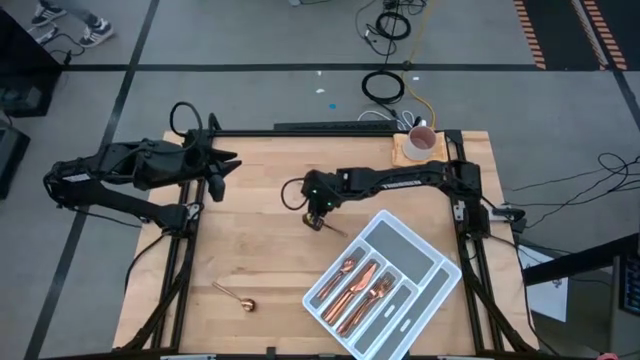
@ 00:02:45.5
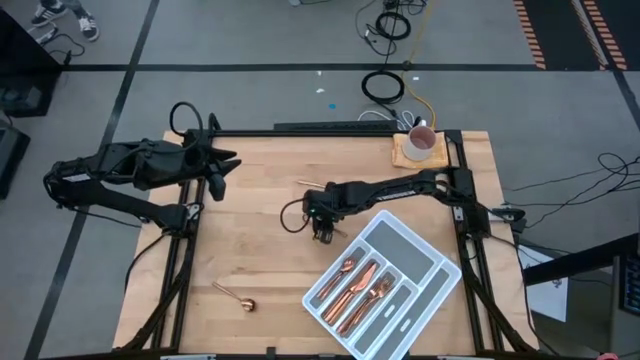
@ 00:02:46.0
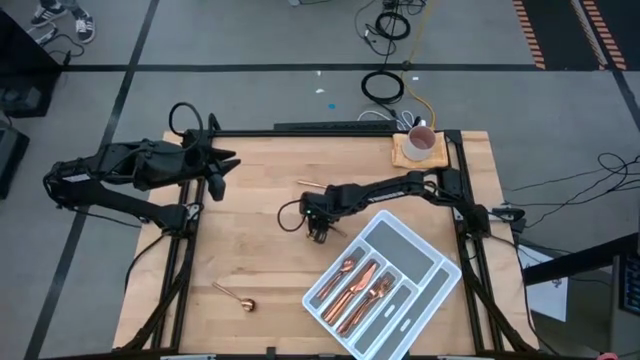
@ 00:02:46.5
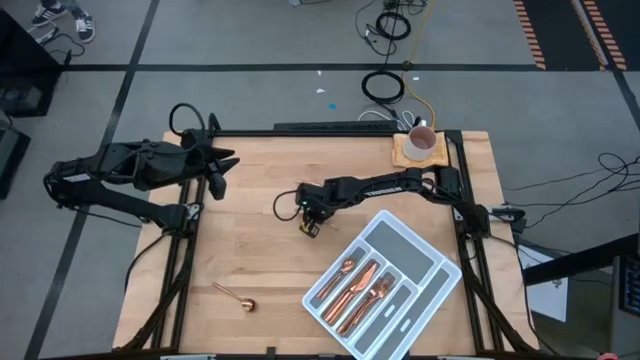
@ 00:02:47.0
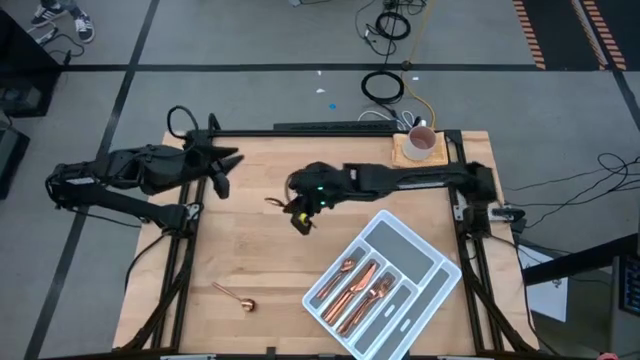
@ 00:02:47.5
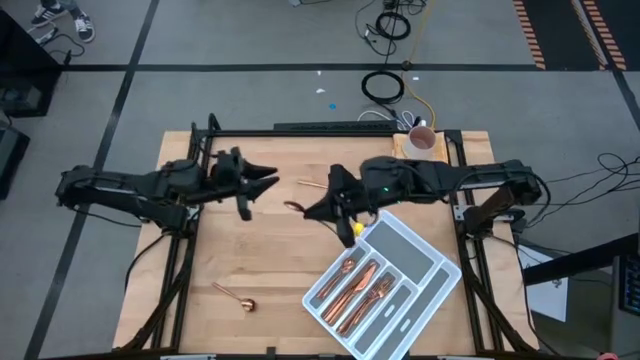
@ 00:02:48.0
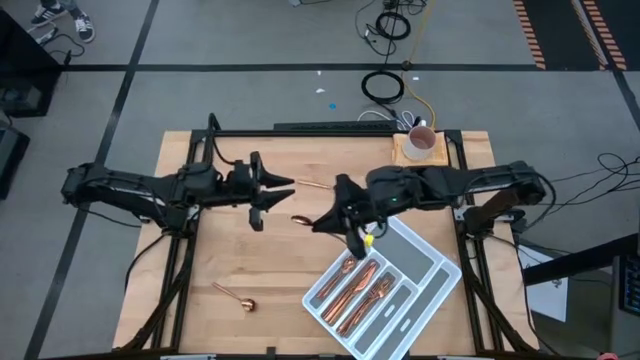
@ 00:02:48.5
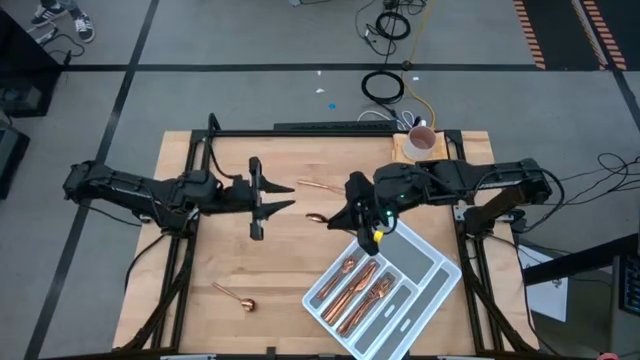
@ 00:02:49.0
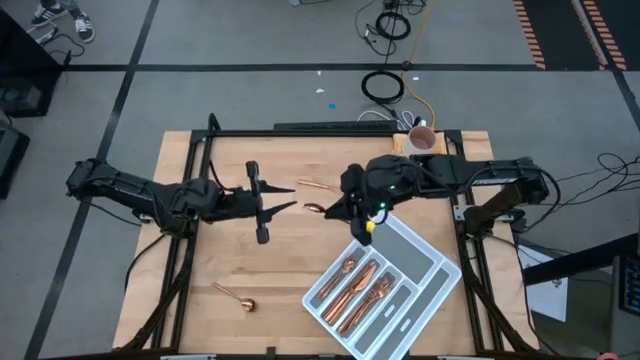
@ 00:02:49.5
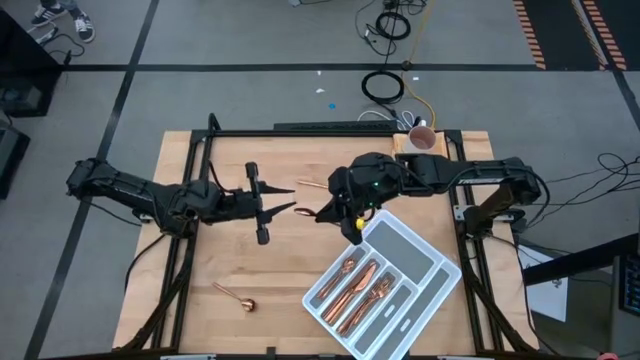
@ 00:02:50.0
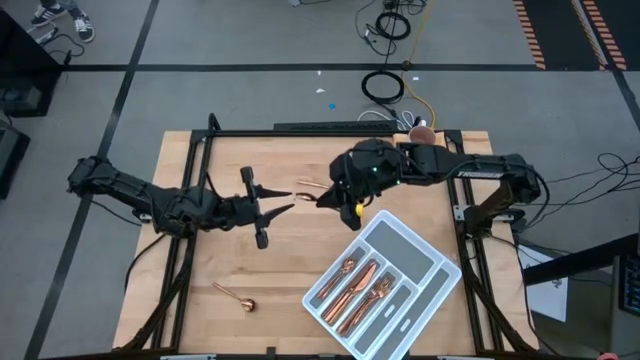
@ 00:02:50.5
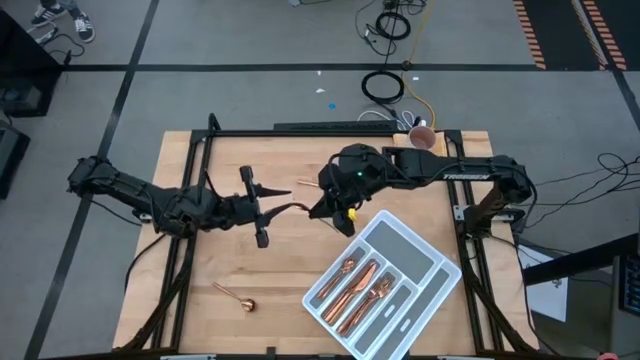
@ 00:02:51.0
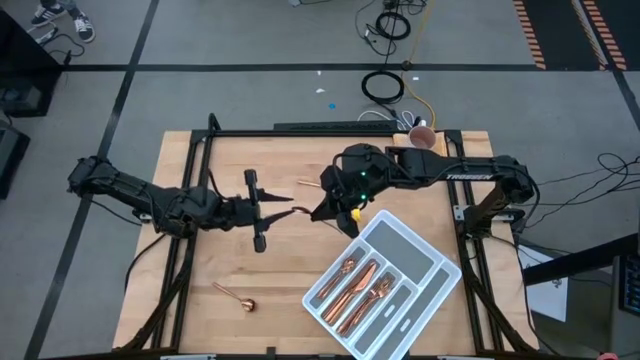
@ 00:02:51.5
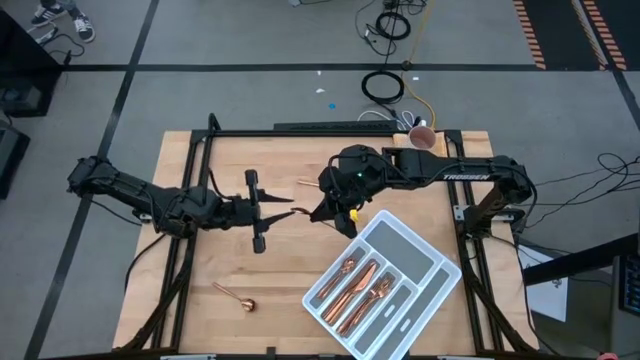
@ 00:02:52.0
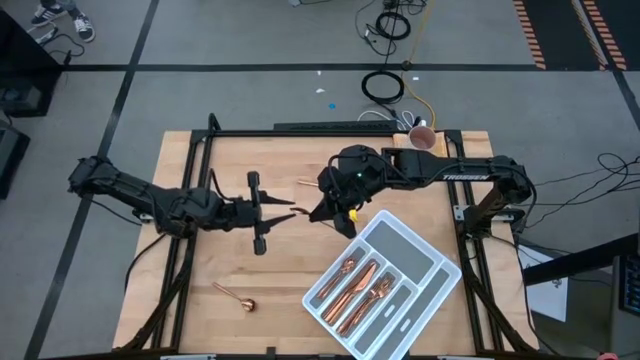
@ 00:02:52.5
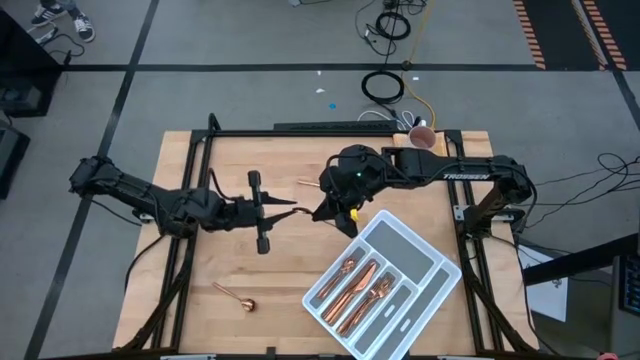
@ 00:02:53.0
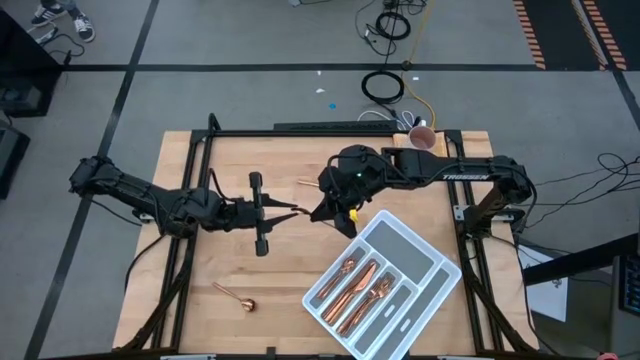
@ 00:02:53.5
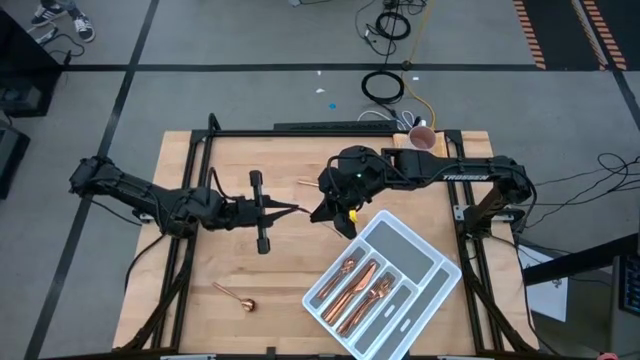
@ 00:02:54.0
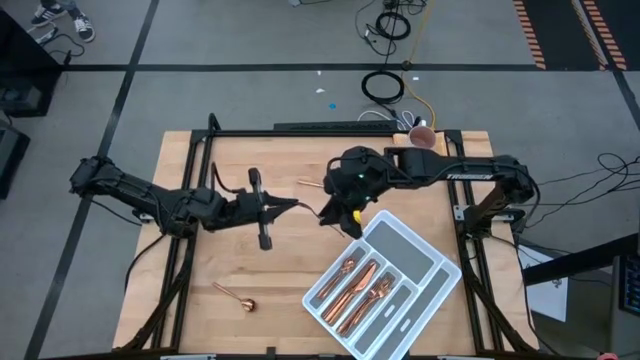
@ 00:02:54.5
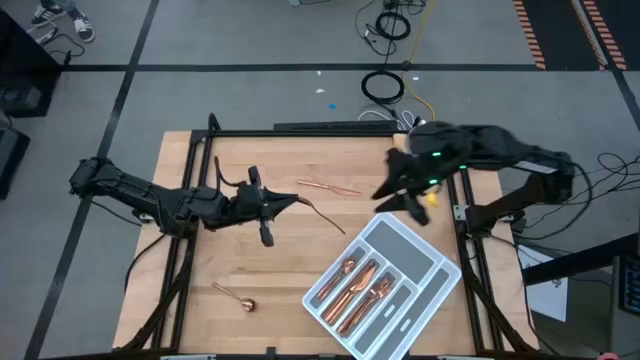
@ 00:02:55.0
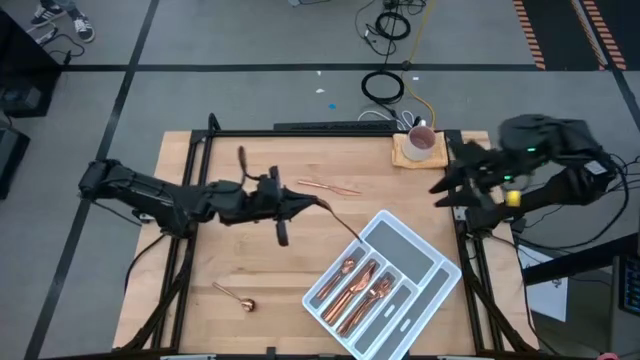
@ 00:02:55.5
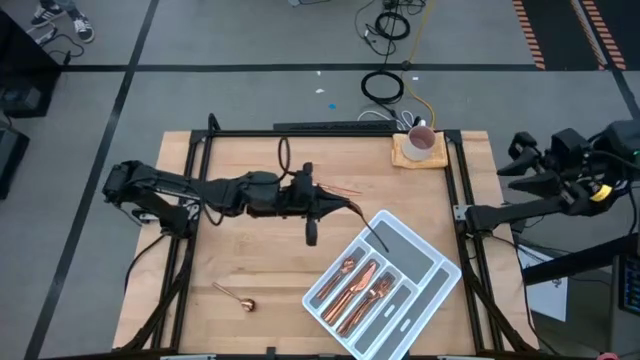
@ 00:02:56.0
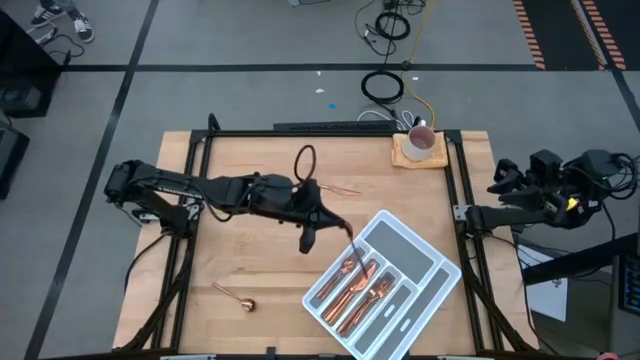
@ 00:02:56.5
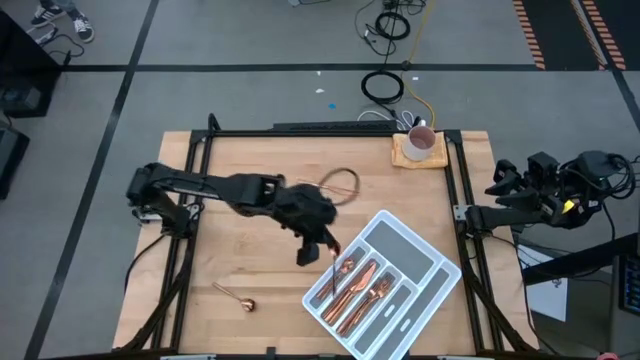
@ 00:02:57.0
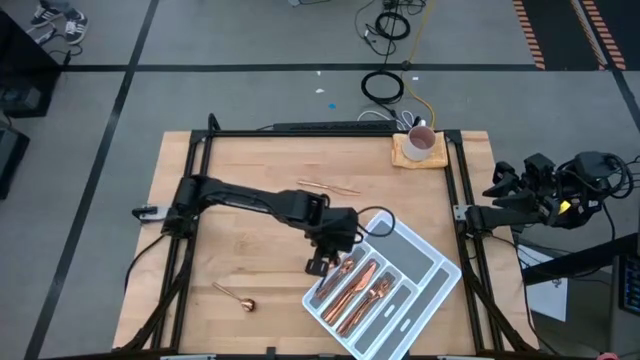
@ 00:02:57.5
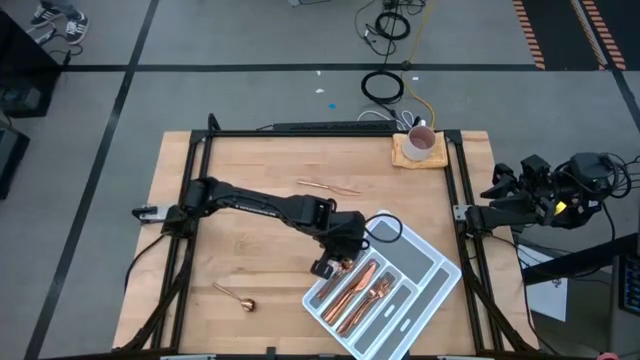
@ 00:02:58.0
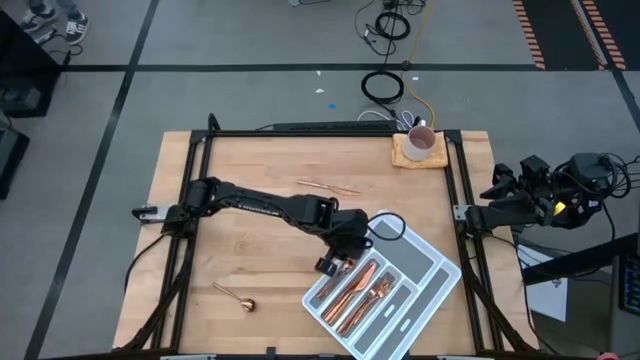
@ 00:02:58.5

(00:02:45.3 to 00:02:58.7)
Task: Sort silverware
Put the gold spoon into the cutlery tray with the other gold spoons

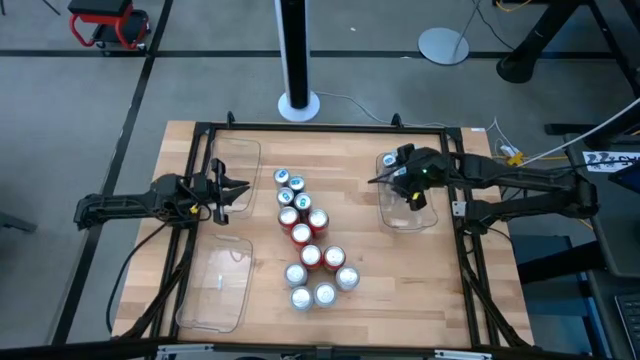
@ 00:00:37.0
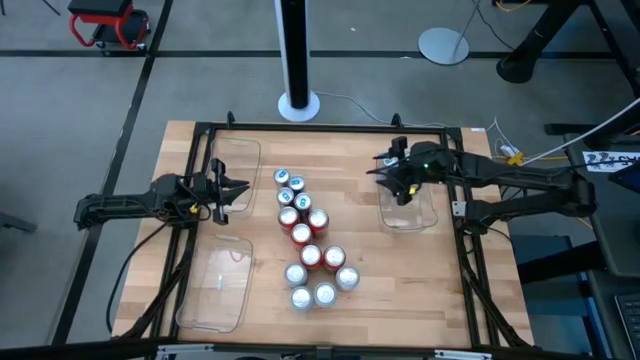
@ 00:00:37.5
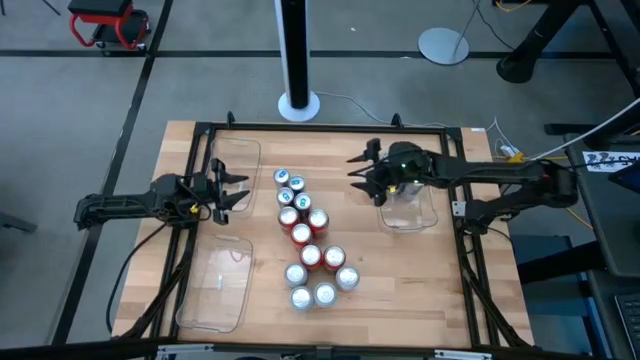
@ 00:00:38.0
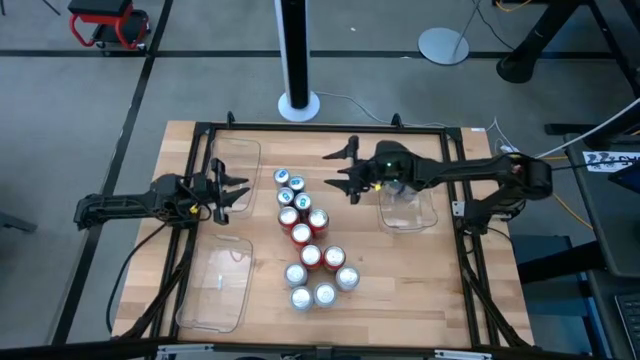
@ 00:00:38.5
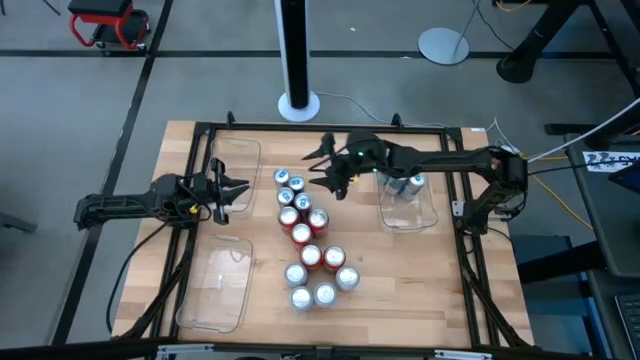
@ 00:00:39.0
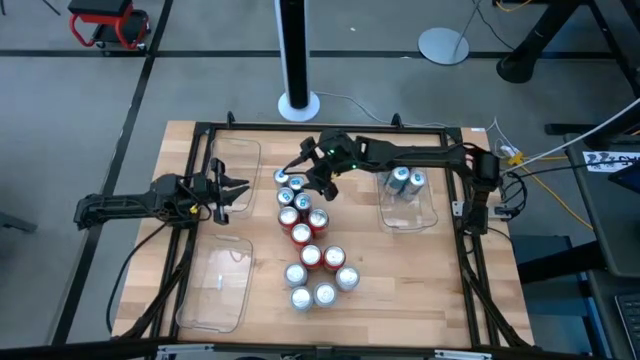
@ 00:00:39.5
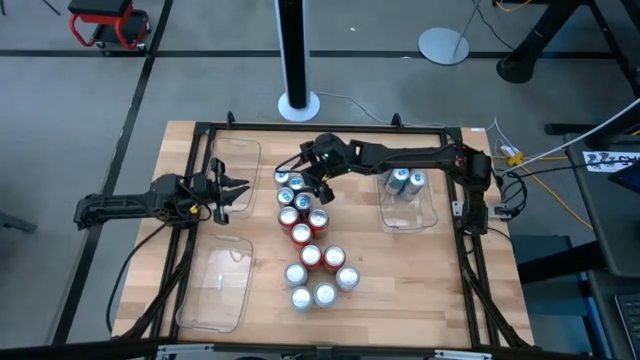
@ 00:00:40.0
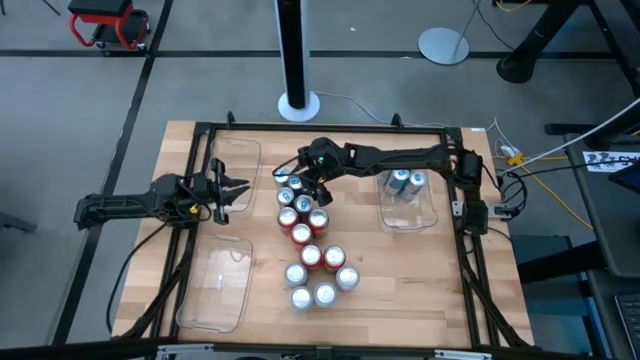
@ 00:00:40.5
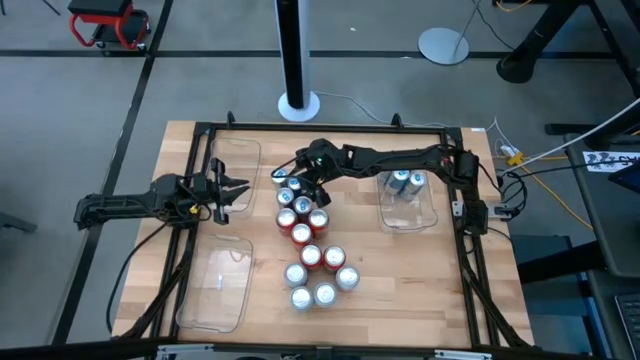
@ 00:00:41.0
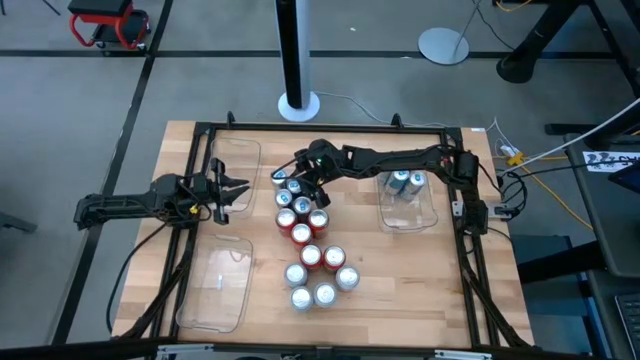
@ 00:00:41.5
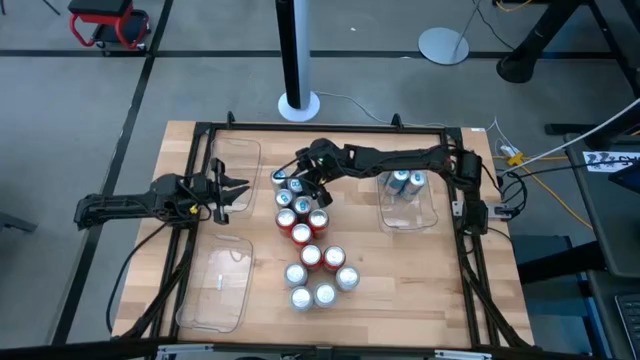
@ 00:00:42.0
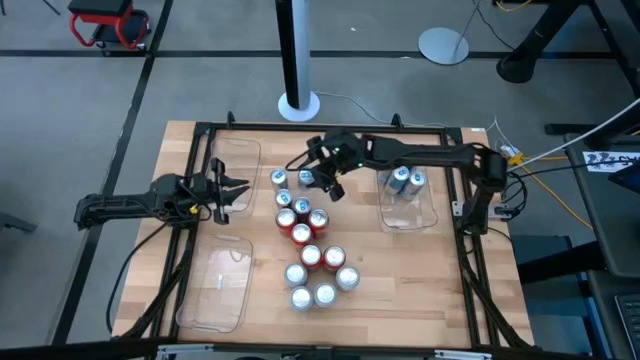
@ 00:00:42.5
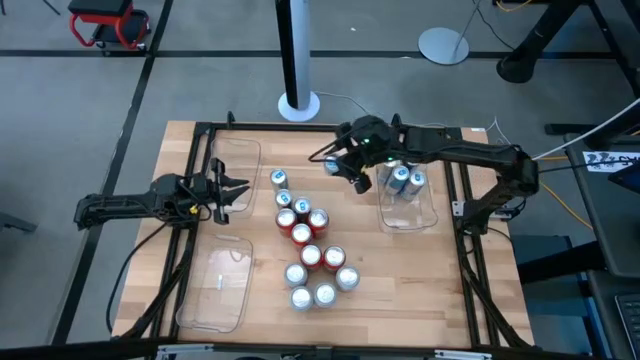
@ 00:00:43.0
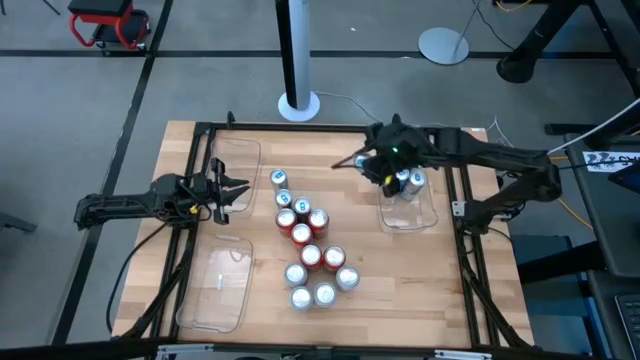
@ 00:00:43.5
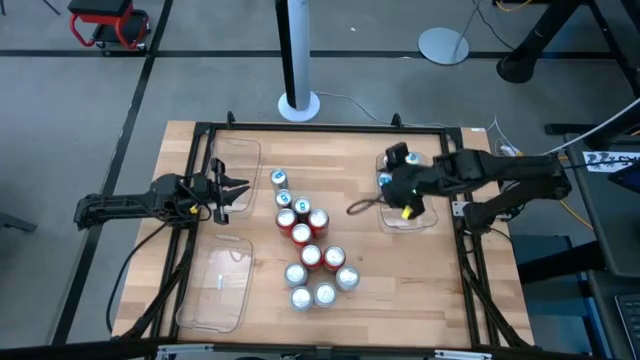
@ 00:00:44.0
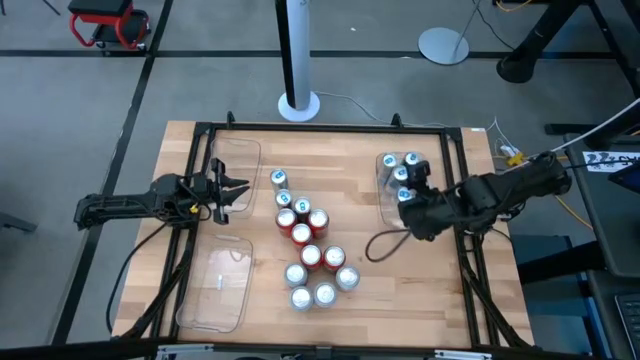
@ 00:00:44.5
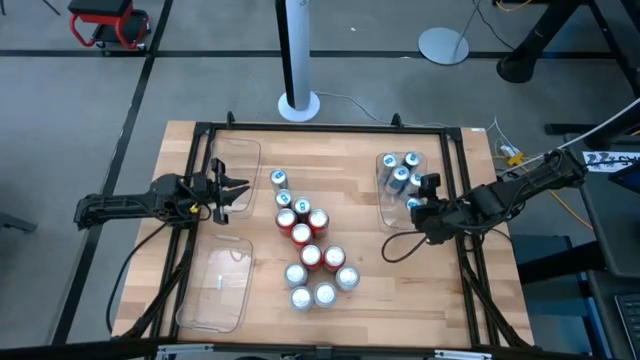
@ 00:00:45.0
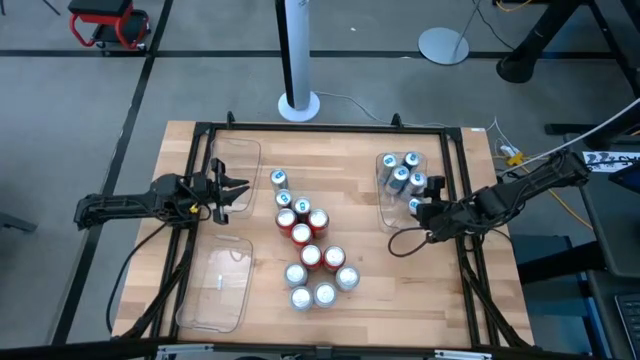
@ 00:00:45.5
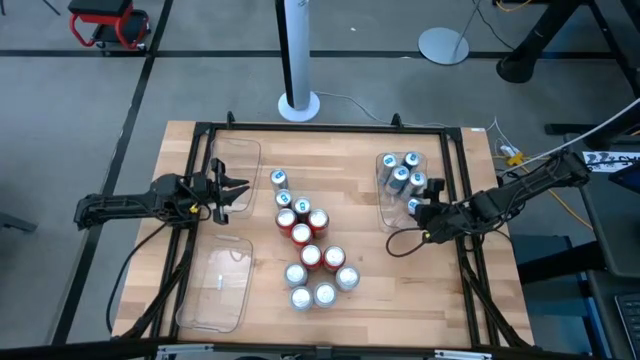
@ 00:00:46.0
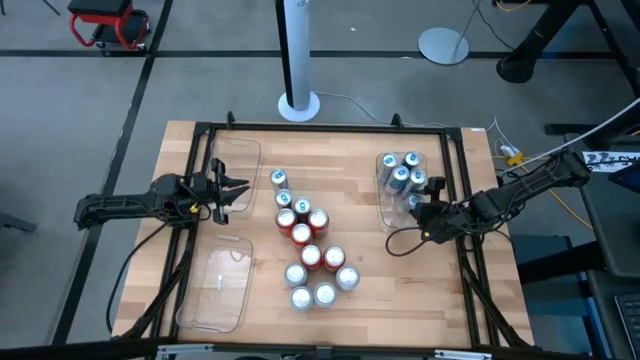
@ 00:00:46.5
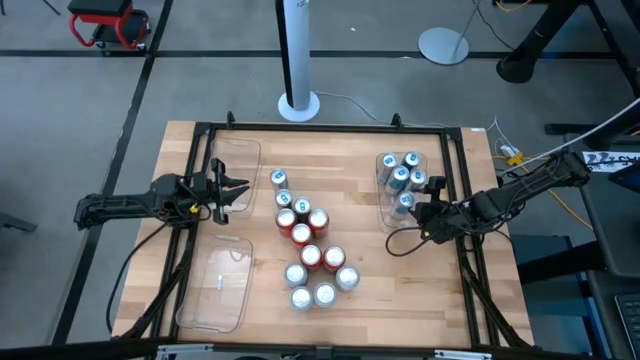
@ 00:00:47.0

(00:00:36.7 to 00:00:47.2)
Task: Sort soda cans
Put the blue soda can into the middle right transparent bin
